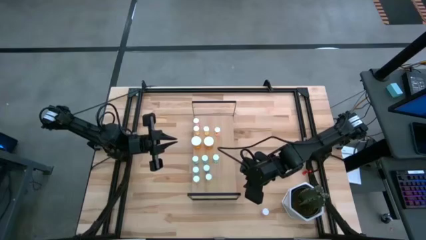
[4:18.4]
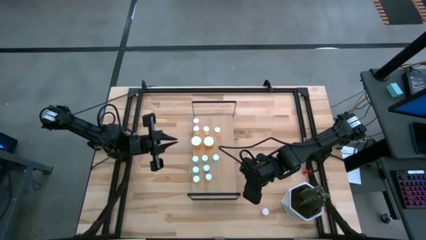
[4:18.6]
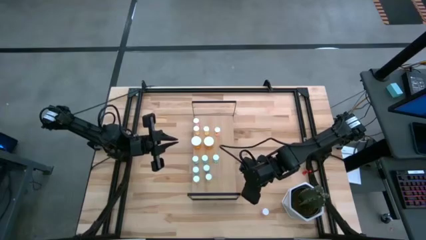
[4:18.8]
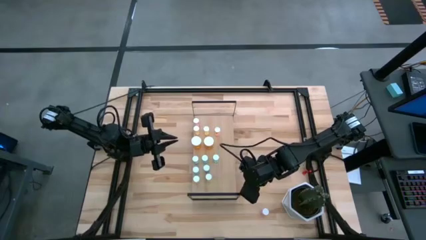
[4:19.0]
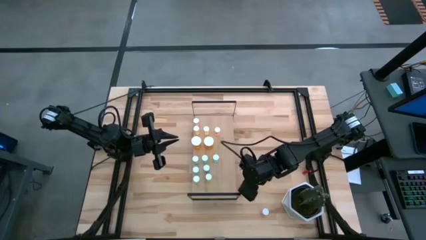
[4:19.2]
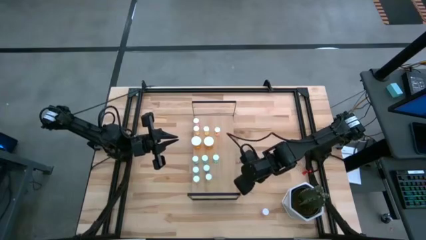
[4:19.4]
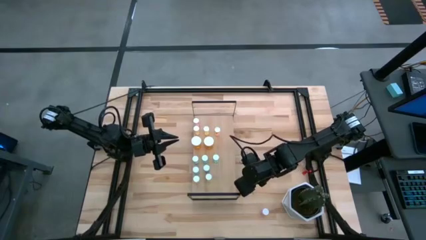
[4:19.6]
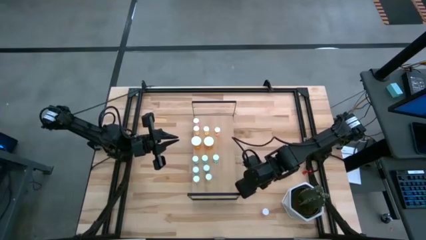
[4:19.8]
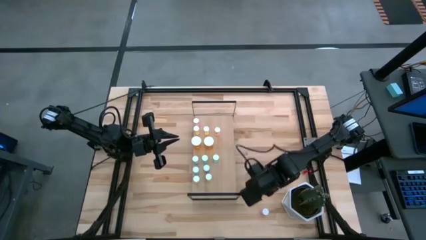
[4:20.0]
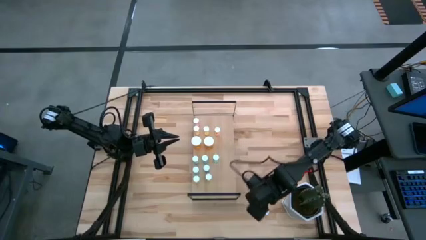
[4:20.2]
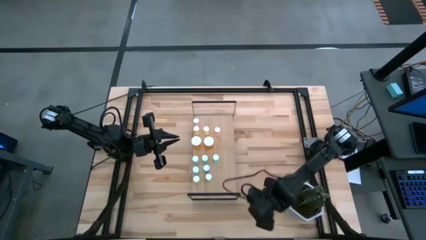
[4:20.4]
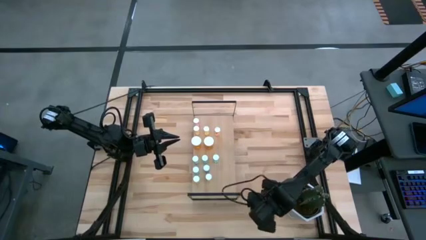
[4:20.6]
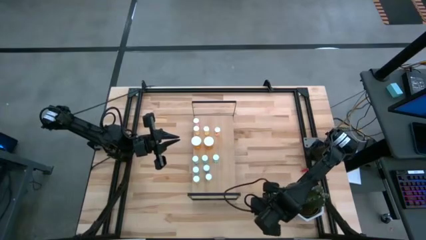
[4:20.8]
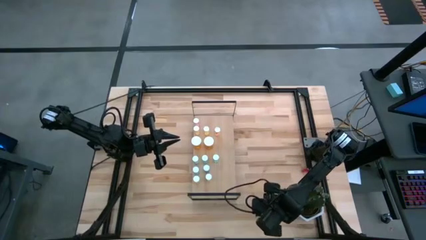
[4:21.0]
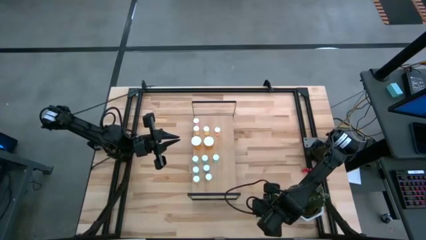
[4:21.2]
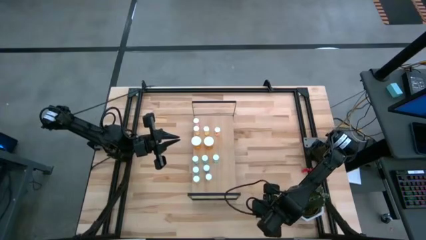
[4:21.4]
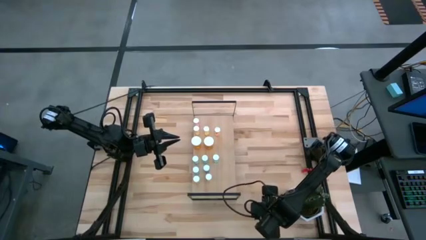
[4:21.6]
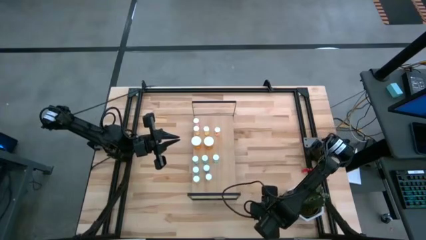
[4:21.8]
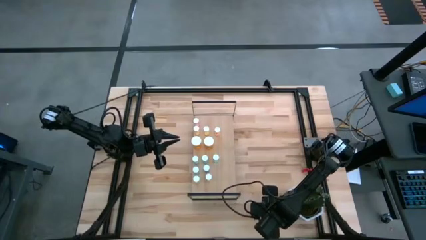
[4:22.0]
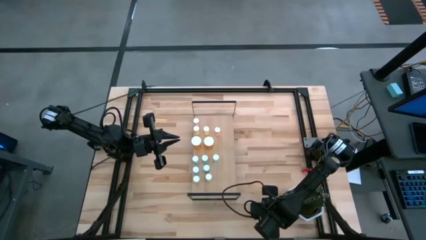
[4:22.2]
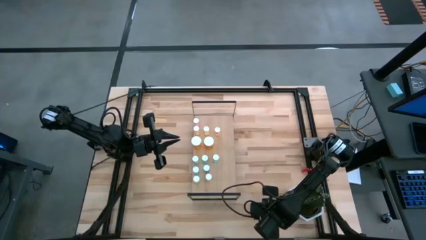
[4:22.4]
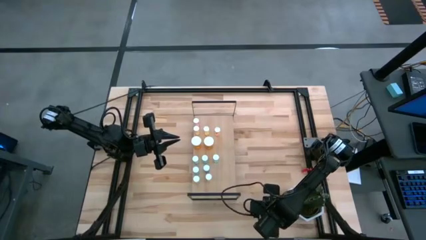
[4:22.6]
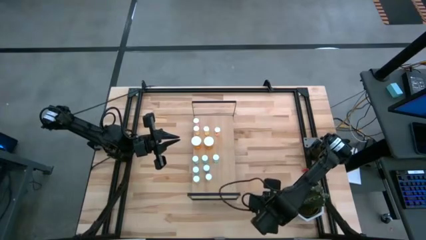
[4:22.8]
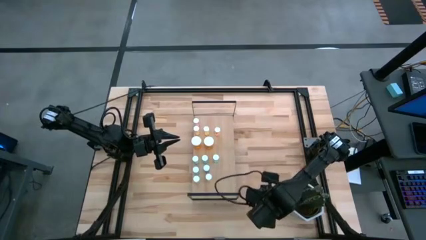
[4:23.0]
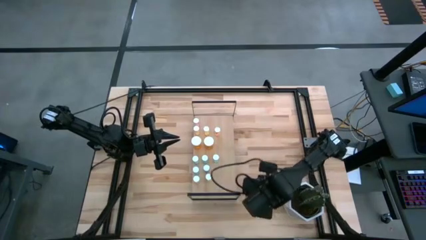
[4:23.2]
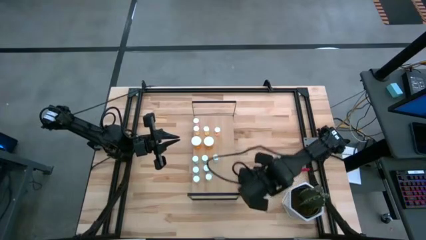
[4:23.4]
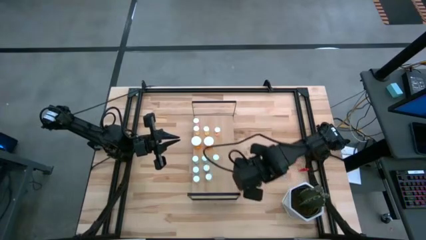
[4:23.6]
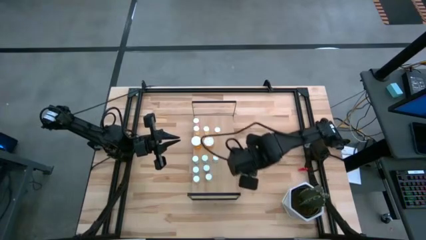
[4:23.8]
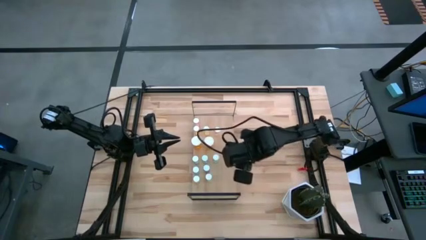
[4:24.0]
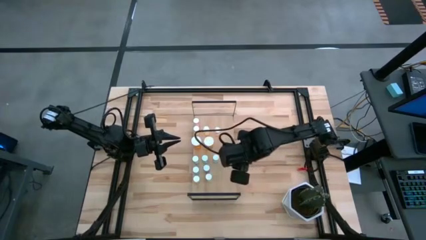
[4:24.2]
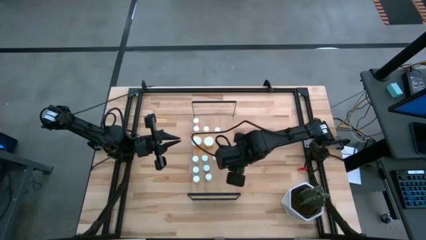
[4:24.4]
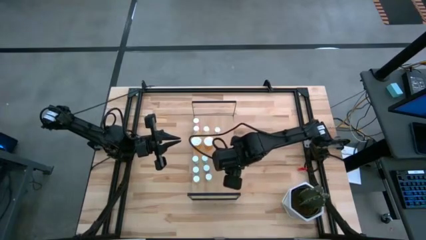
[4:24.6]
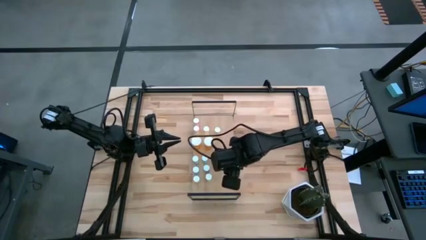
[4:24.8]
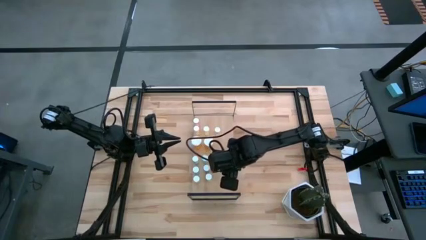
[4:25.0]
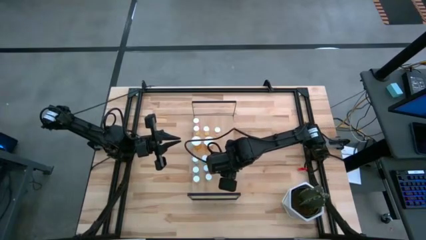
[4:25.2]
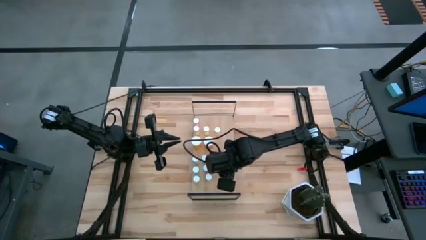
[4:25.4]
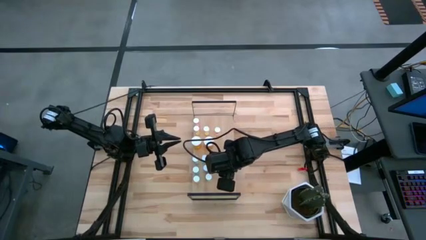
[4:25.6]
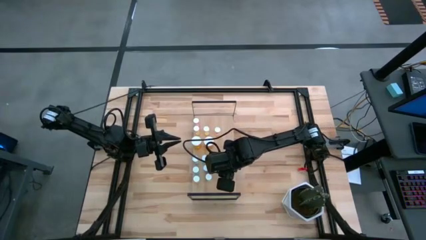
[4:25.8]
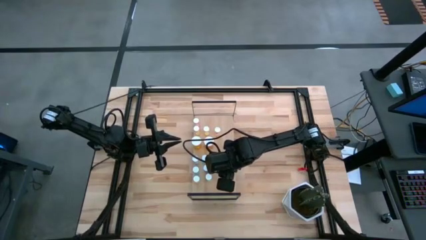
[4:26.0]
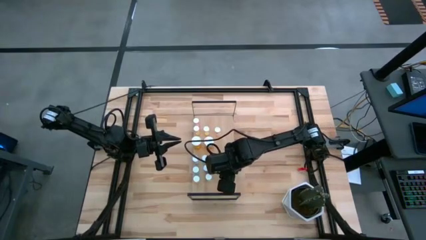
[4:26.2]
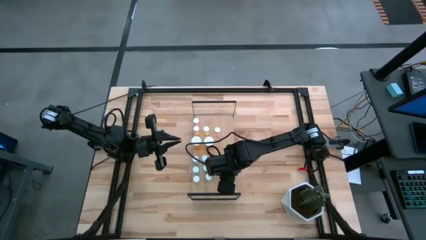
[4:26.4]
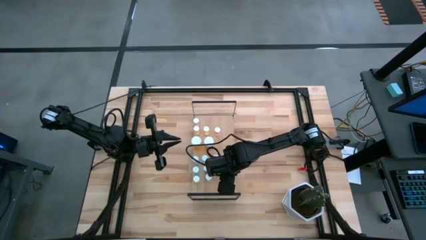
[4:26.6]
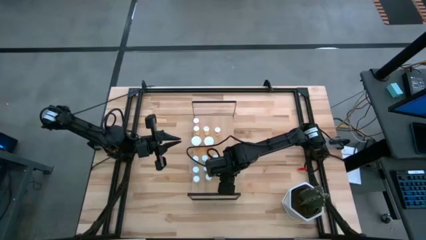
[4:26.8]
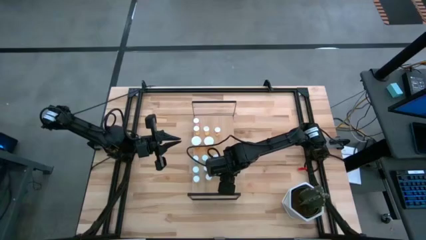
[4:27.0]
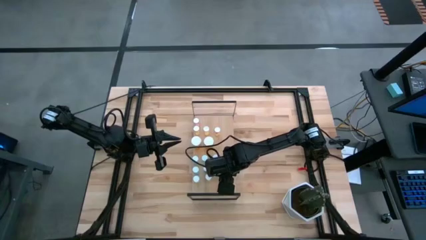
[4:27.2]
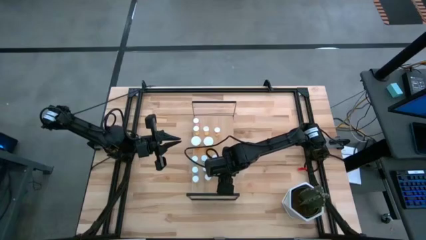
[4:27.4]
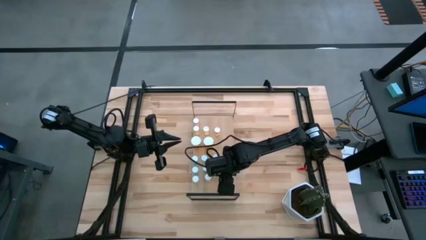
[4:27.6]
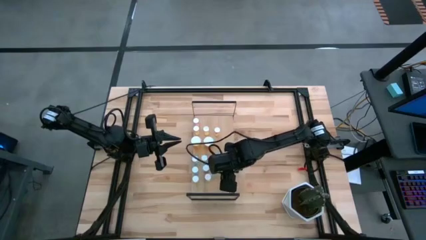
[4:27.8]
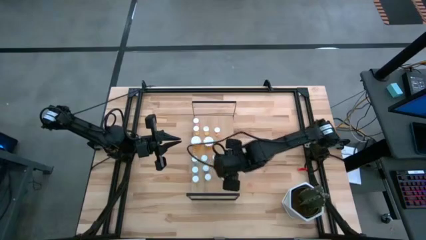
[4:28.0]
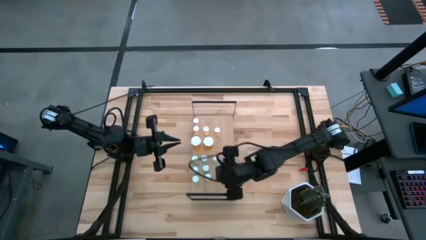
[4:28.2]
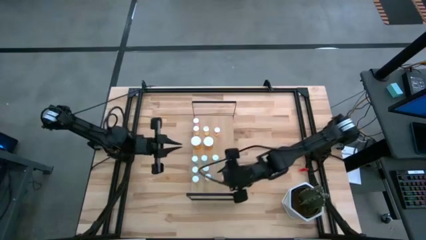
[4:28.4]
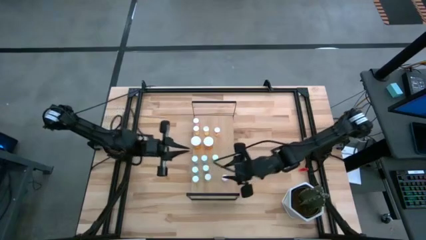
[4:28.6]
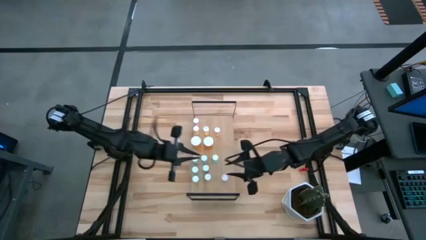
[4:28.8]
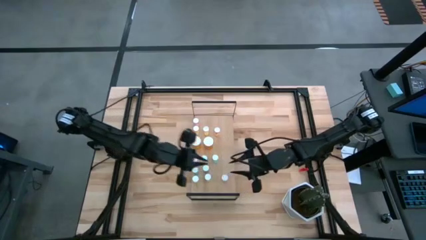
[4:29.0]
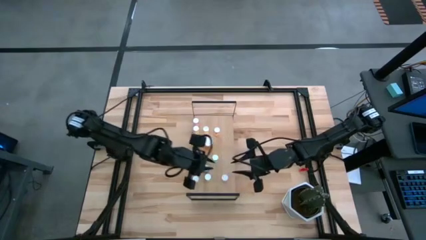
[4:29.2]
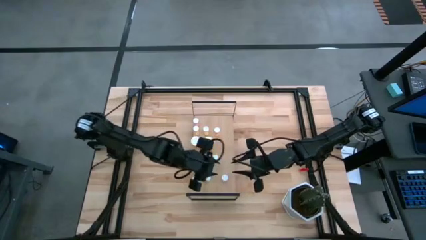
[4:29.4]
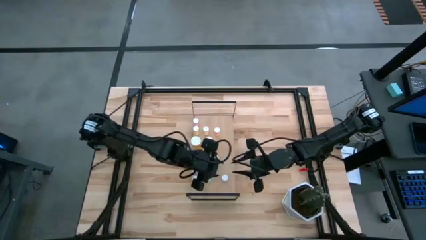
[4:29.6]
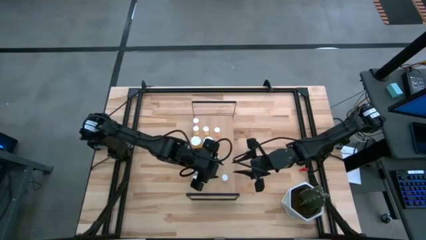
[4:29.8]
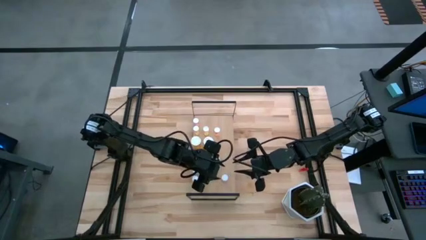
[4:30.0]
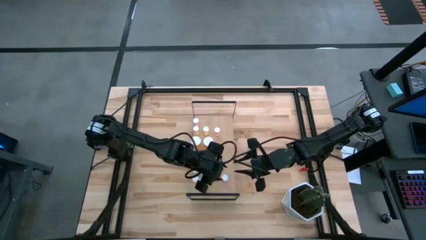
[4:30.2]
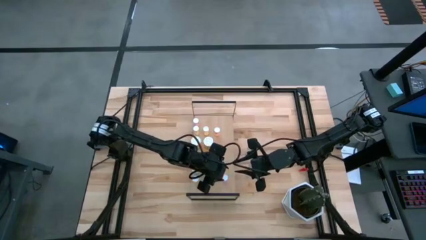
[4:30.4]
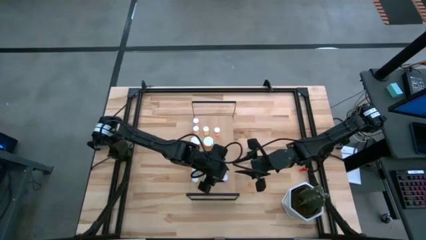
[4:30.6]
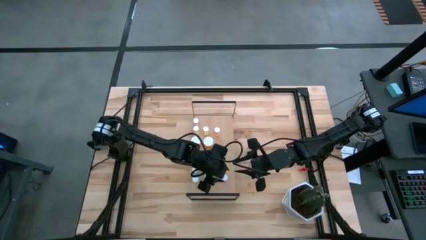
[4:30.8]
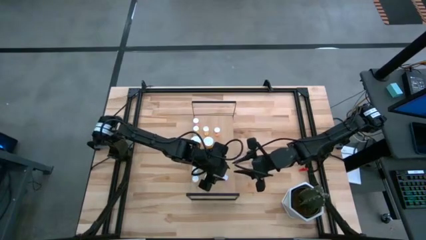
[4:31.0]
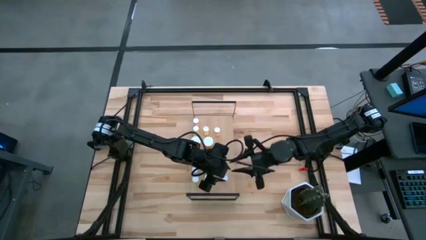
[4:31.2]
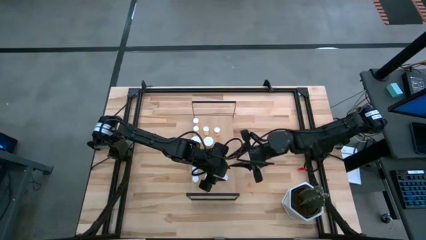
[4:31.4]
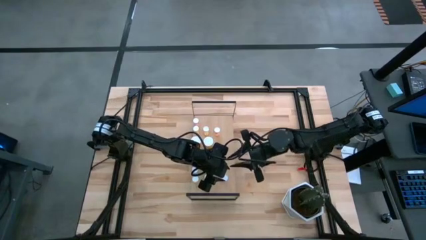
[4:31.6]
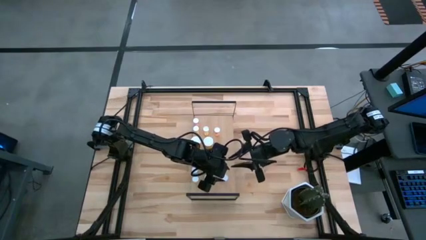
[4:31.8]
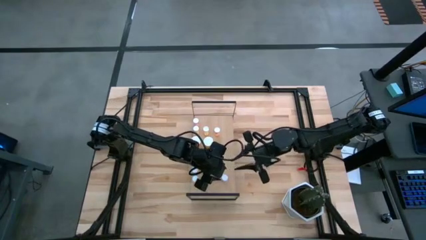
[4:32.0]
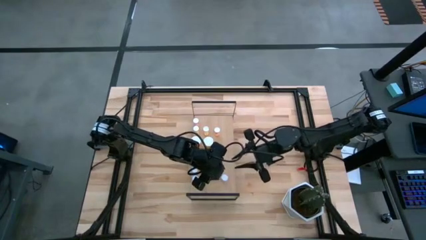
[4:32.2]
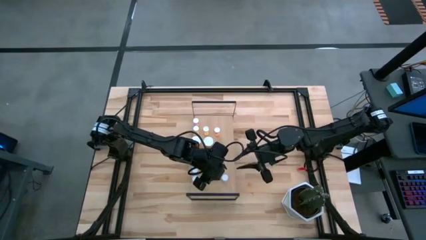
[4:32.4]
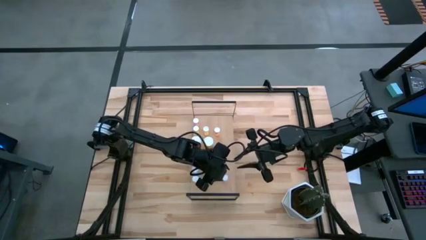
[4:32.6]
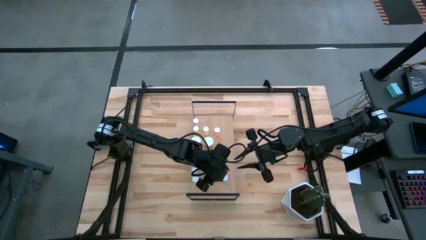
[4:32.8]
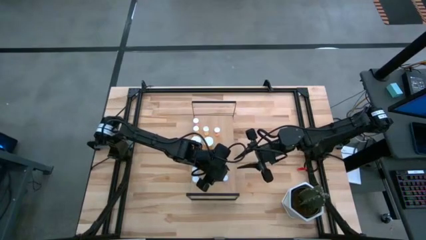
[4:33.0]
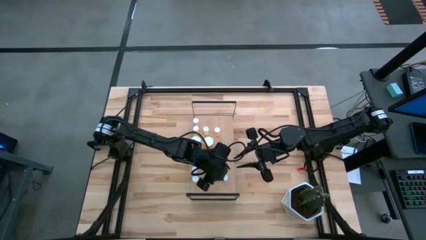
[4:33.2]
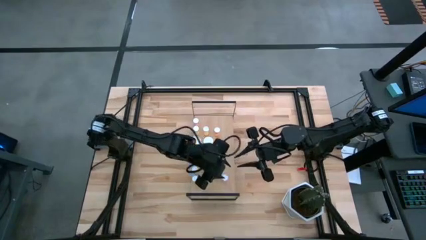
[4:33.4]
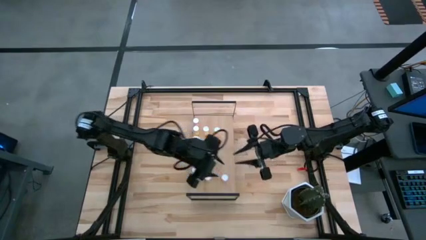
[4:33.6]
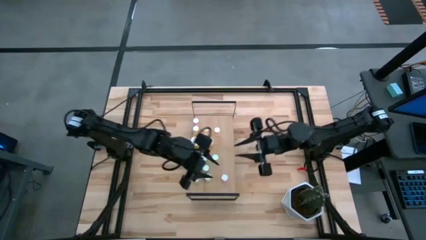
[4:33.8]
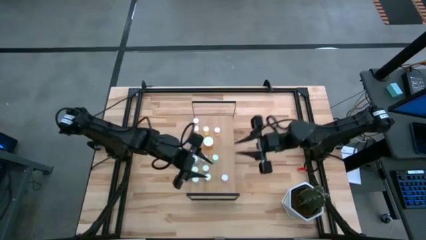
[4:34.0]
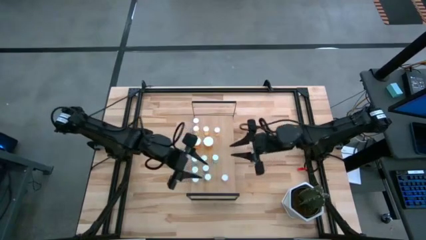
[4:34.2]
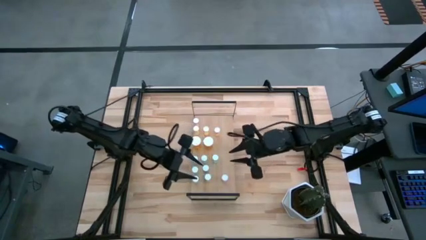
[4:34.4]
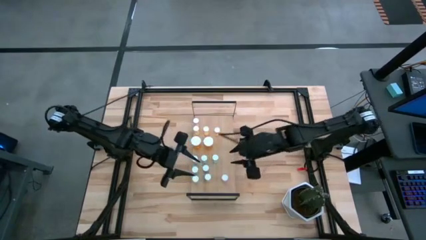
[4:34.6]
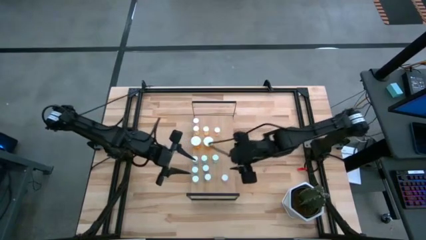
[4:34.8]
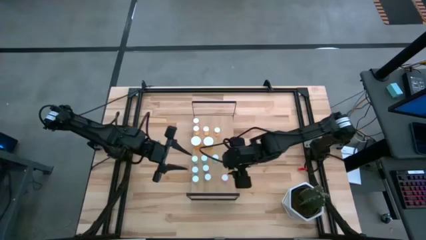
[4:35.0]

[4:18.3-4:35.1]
Task: Pick and place medicine bottles onto shelf by color
Adjust the pill bottles on the shelf
